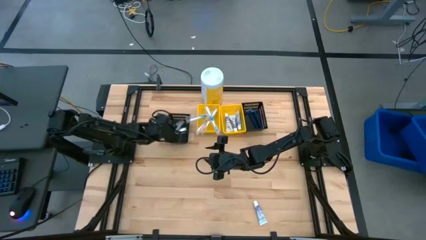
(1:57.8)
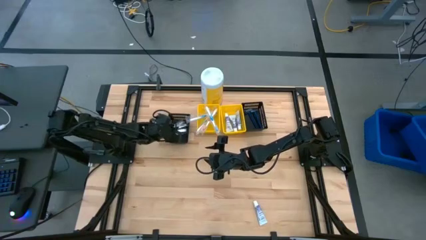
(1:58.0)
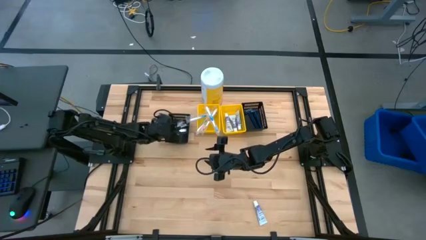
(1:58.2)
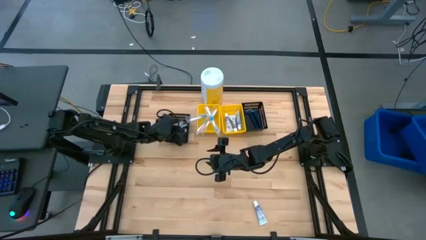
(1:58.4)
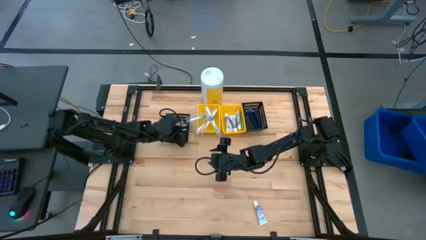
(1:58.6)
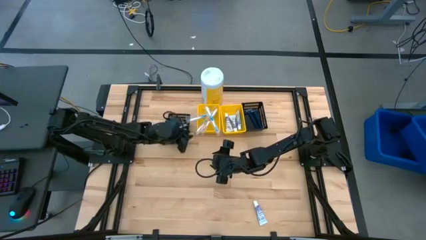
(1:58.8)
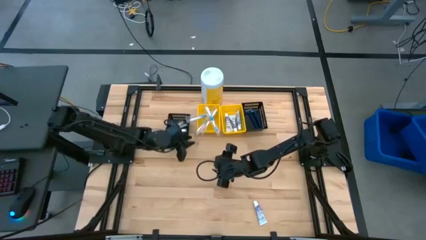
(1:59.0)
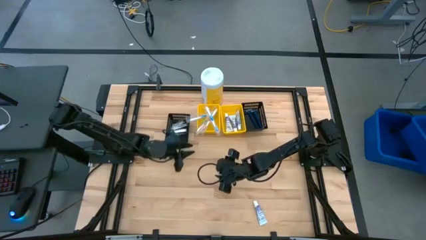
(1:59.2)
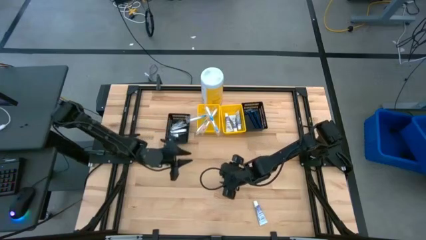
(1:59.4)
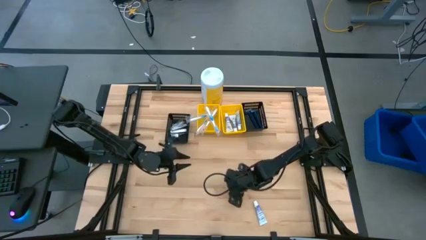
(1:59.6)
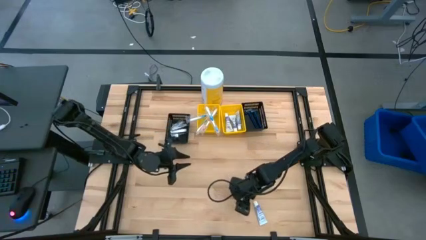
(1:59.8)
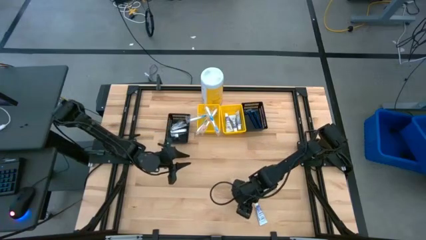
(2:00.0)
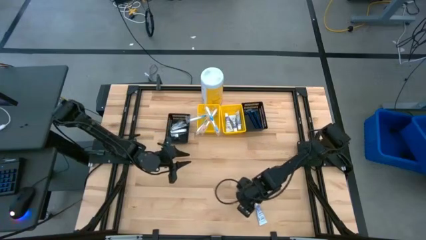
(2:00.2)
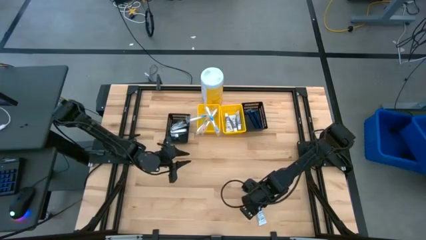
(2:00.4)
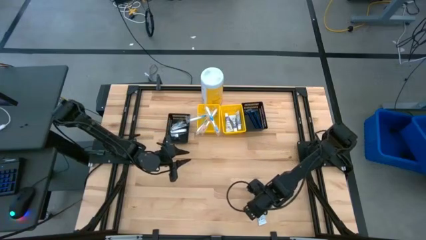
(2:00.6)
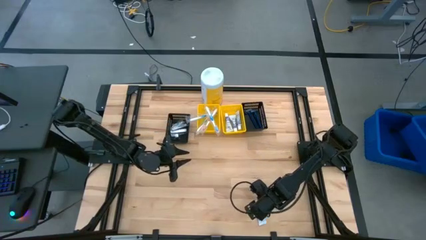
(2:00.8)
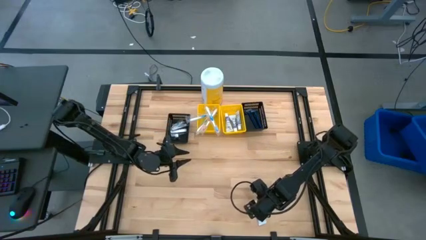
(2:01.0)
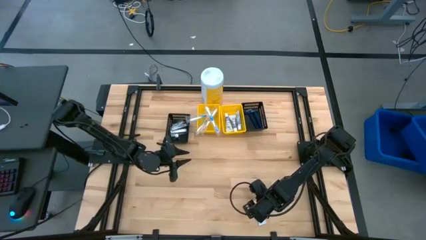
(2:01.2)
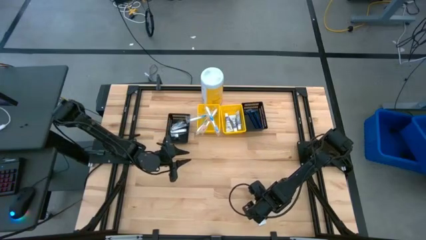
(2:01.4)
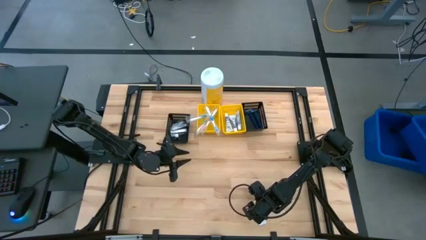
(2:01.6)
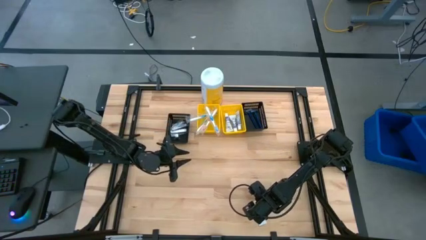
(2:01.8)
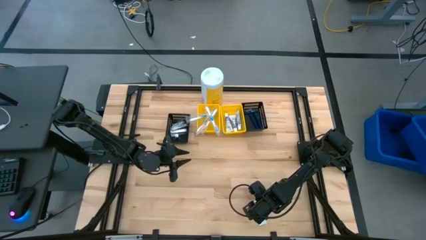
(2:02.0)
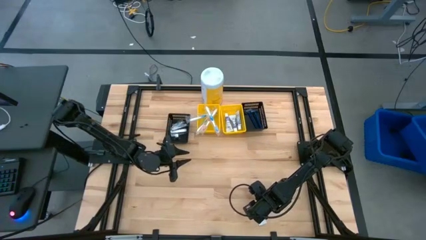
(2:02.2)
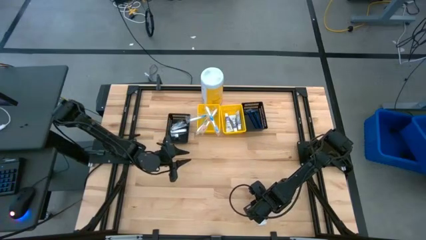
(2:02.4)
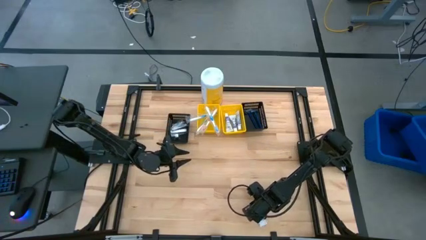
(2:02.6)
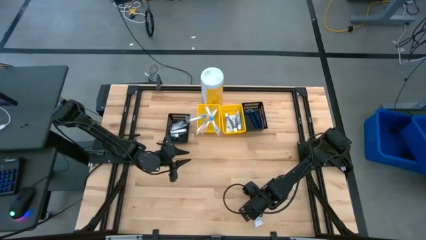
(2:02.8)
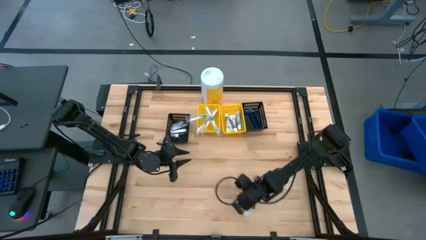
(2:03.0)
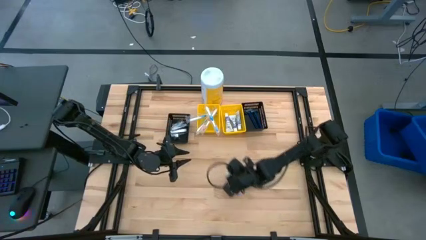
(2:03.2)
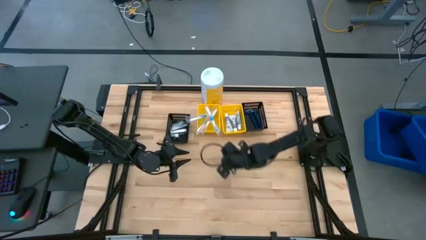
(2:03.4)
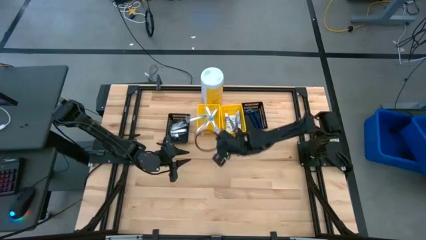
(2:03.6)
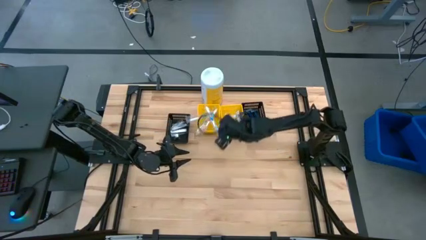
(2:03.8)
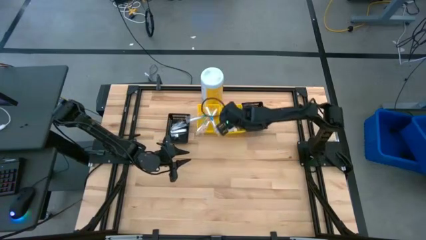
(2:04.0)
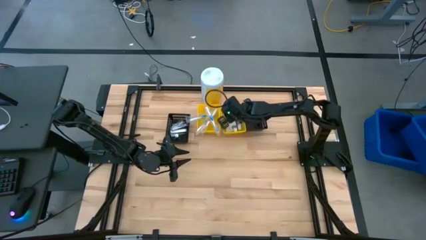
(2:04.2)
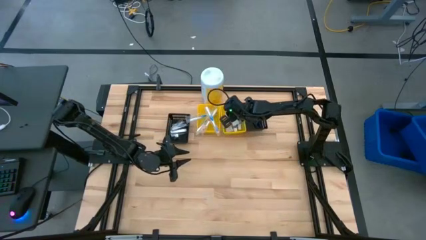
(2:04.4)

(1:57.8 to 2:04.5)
Task: Pick & Place Travel size toiletries
Put the white toothpaste into the right yellow bin

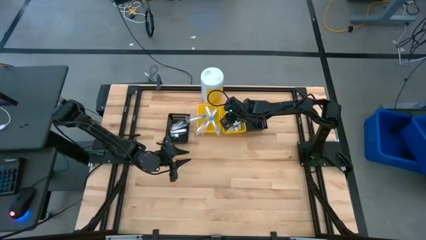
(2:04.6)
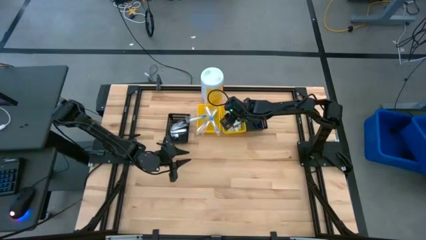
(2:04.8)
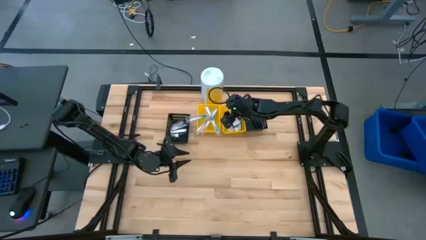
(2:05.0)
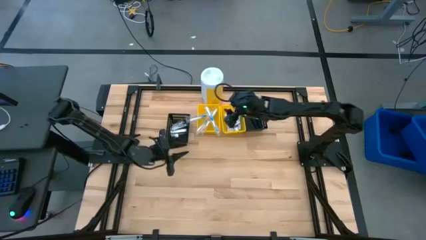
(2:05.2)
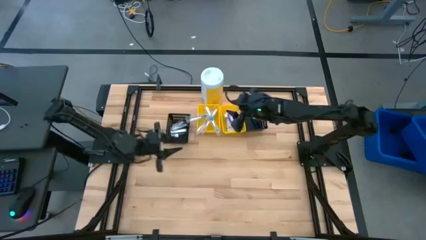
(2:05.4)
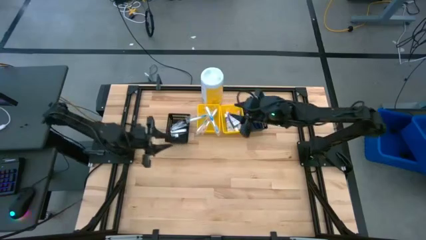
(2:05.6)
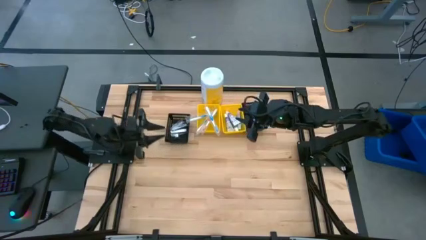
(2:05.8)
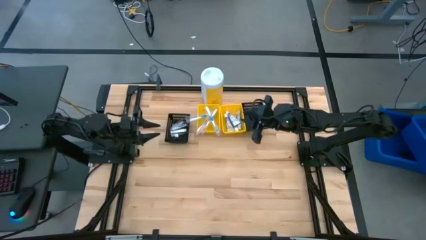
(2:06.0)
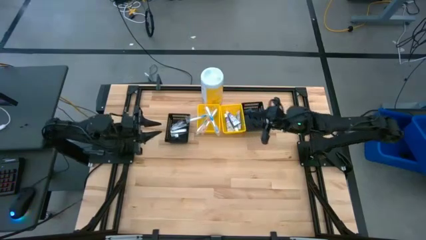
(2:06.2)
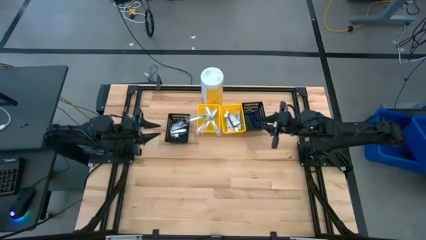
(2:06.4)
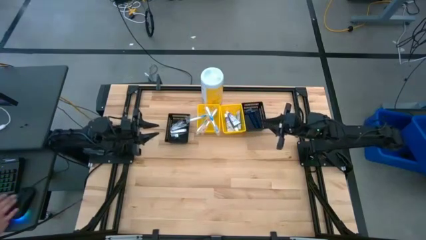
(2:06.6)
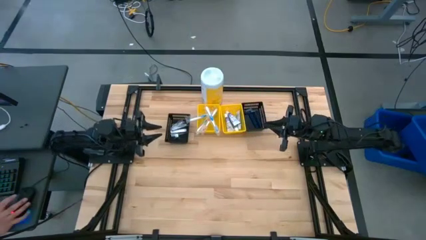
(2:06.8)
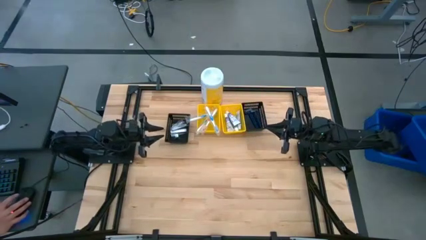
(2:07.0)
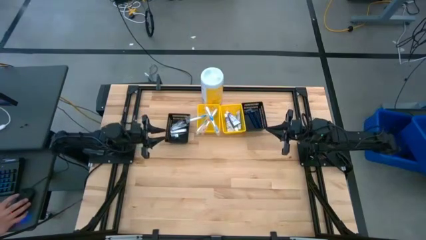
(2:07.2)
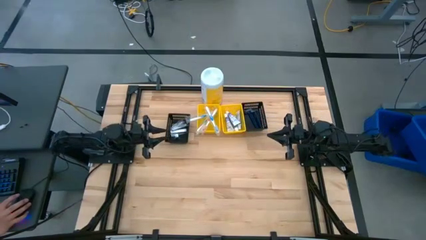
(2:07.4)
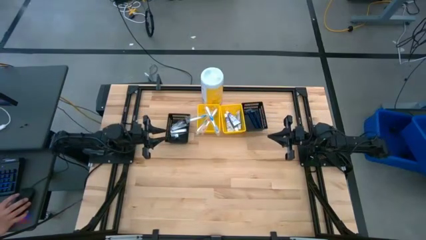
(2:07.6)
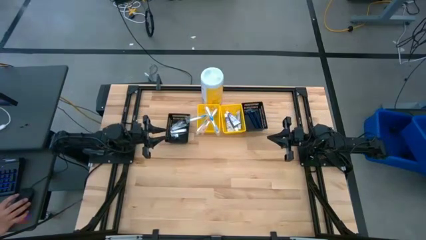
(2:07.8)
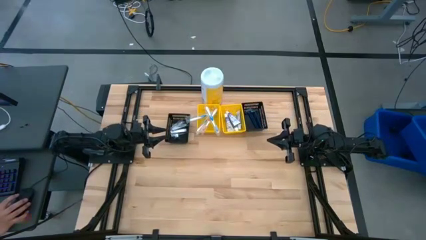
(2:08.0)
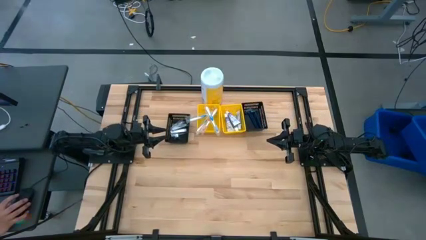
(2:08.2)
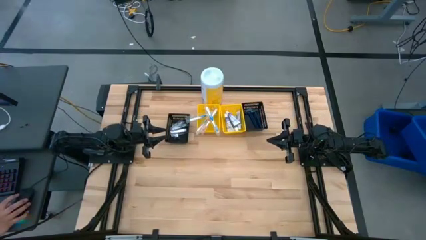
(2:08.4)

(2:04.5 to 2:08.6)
Return to Home Position

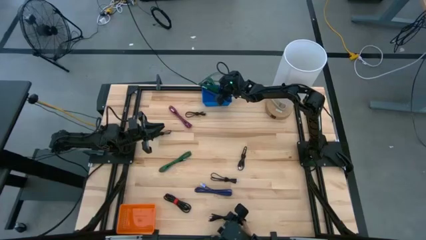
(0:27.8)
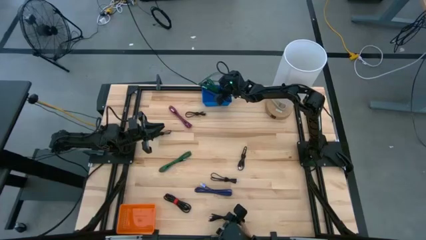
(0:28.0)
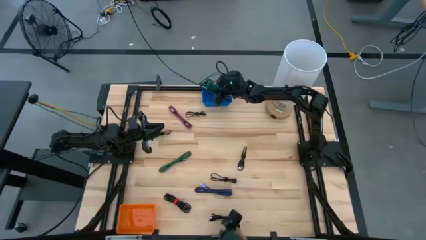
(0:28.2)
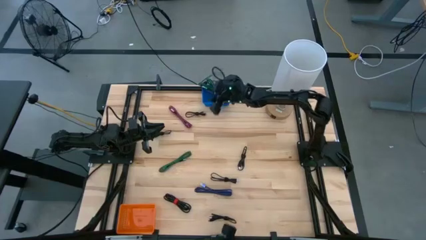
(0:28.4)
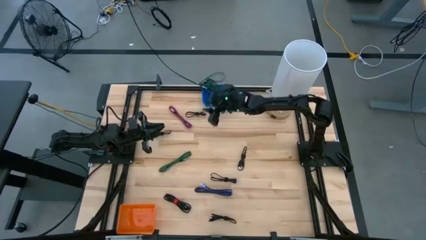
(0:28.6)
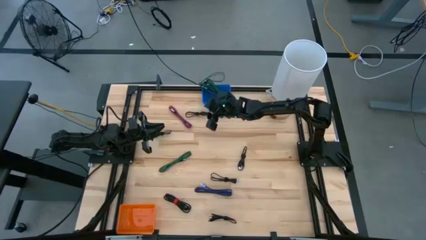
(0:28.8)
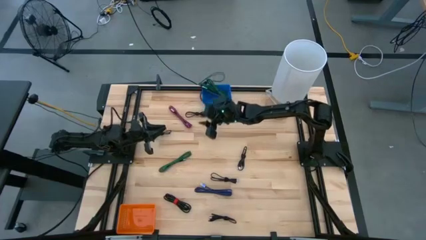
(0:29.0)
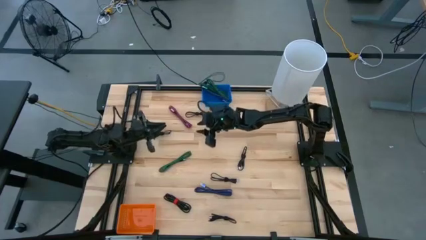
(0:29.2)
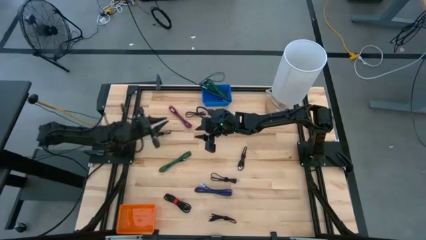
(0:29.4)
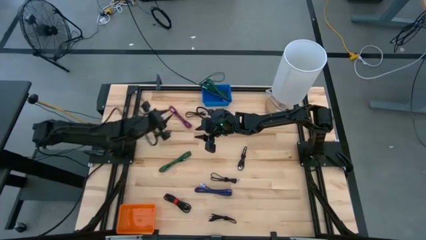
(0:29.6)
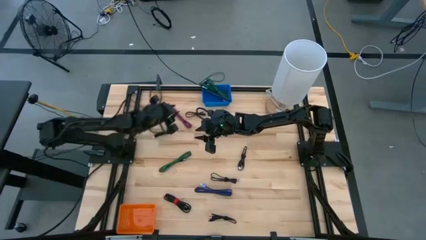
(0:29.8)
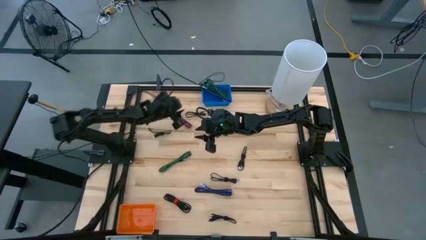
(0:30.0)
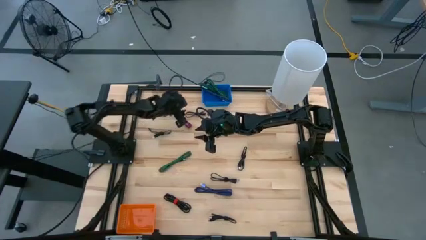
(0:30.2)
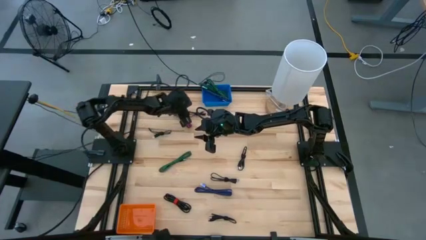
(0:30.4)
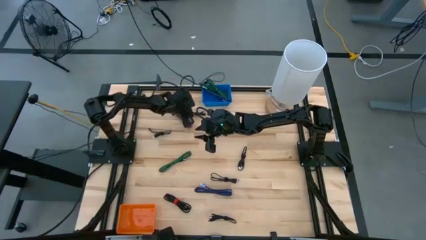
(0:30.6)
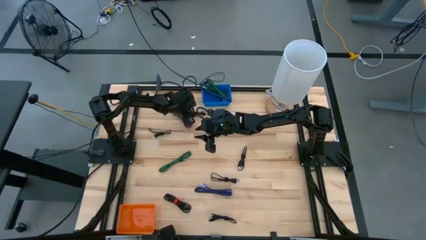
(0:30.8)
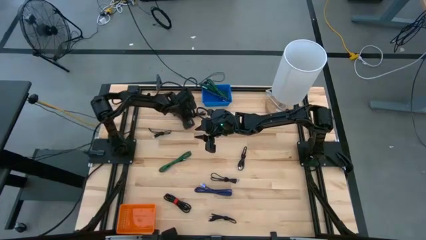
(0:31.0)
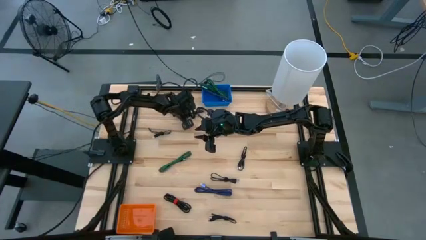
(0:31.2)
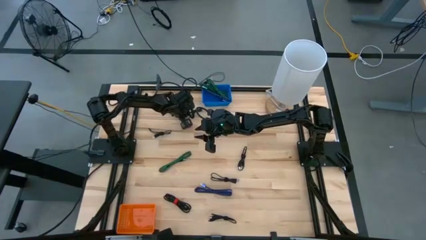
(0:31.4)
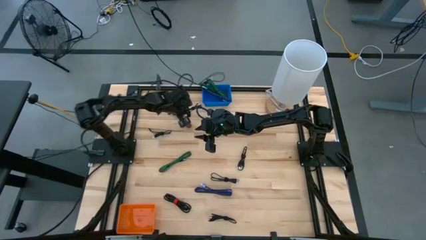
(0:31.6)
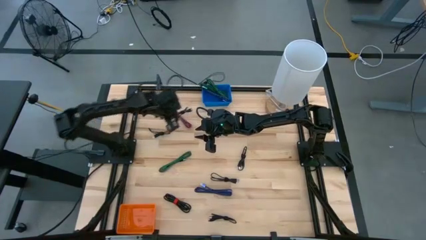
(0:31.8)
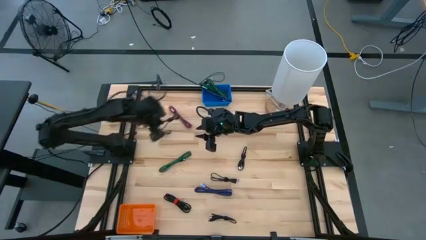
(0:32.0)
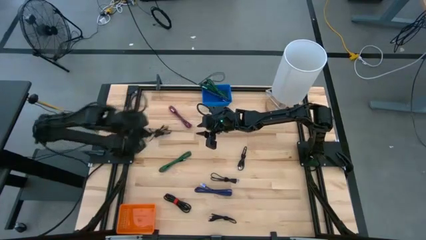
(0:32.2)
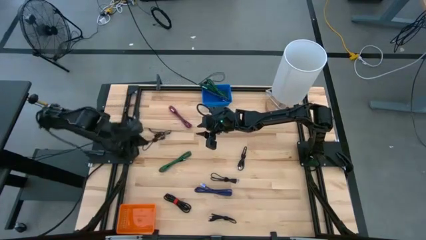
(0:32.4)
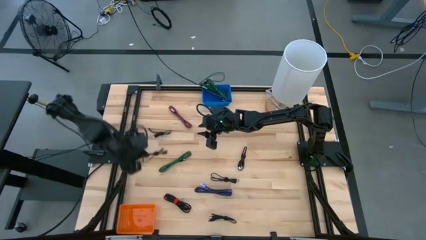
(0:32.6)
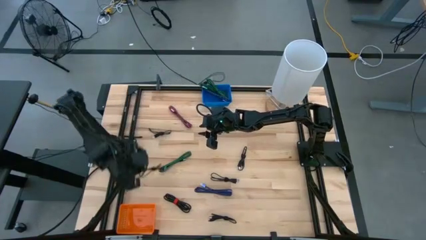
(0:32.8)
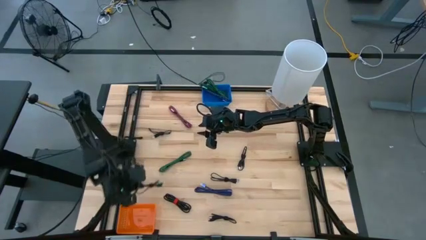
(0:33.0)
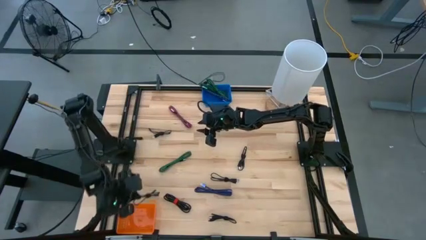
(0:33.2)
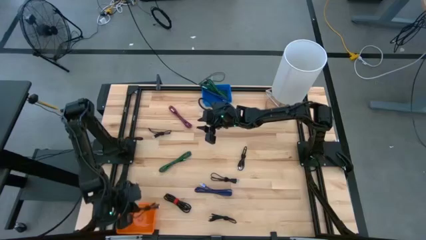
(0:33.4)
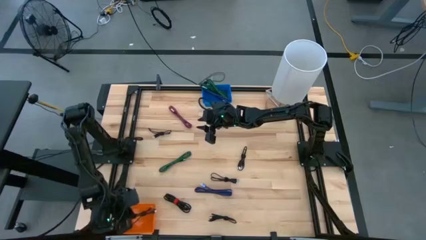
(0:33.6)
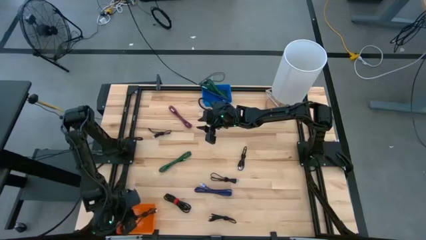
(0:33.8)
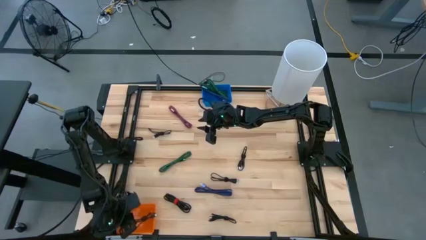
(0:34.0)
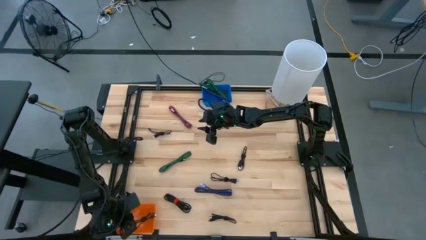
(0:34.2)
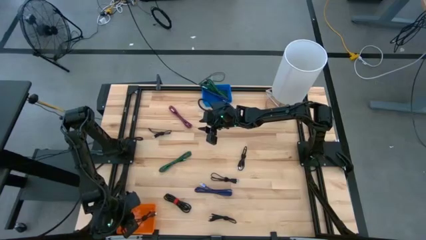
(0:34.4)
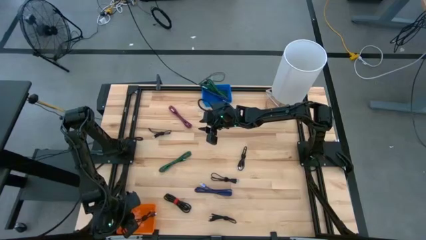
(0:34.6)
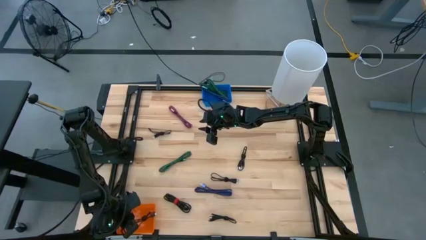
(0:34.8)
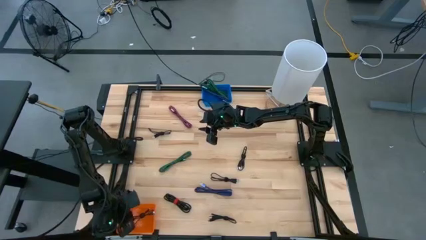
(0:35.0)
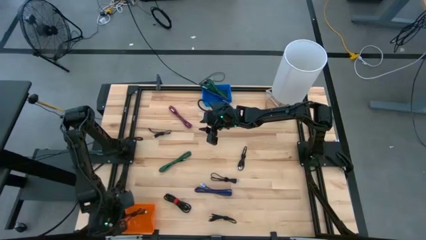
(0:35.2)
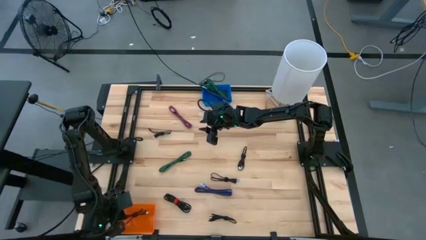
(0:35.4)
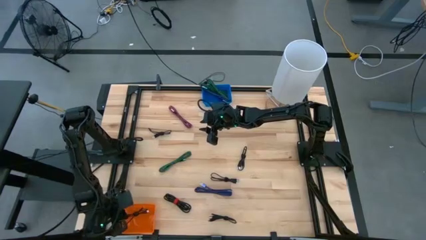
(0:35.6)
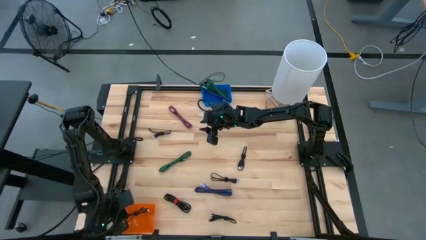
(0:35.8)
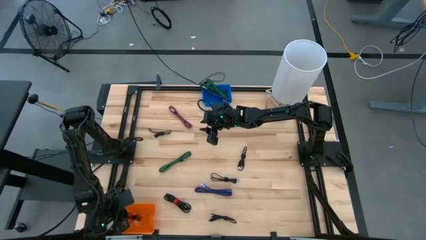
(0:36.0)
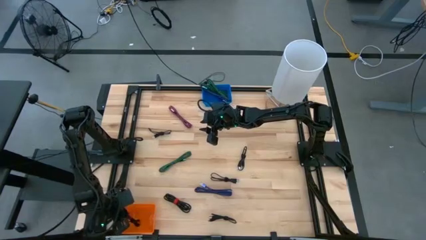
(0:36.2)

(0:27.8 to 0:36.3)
Task: Pick & Place USB Port
Put the black charger cable into the orange basket
